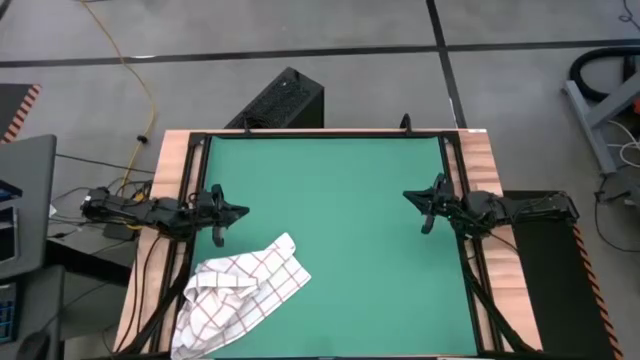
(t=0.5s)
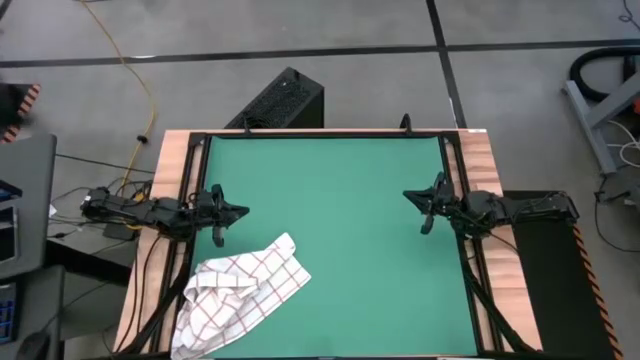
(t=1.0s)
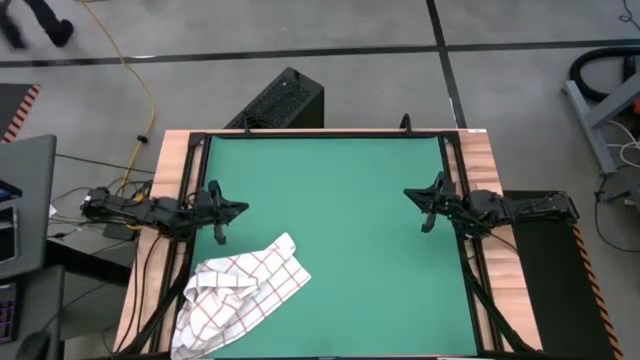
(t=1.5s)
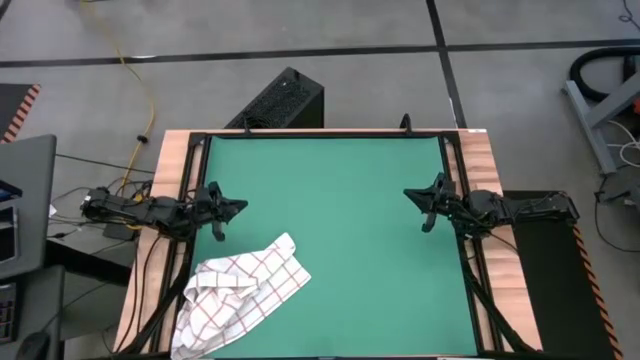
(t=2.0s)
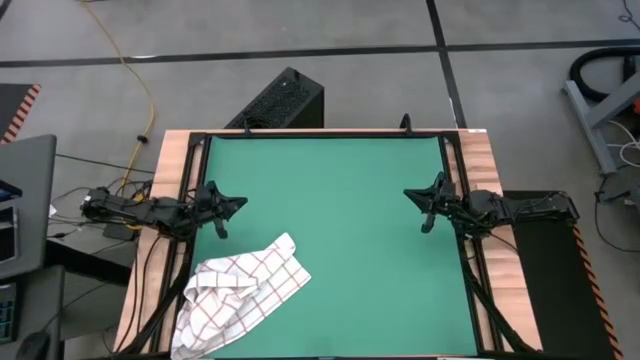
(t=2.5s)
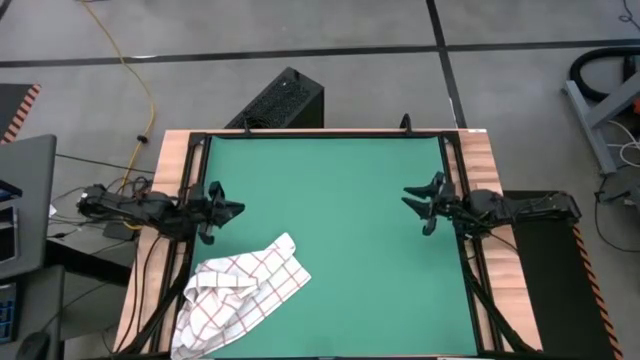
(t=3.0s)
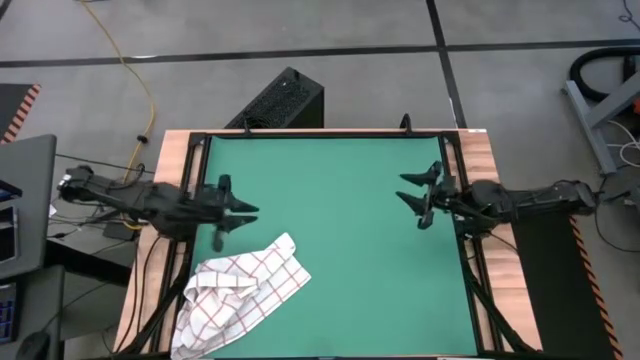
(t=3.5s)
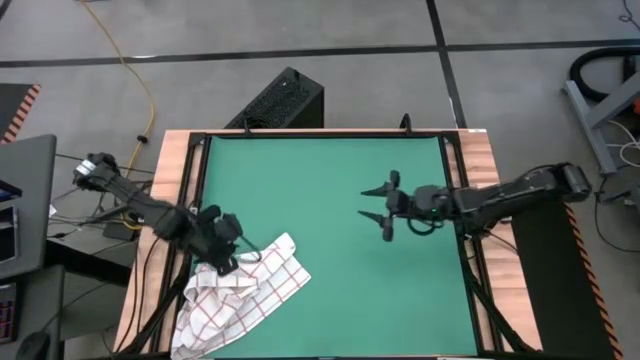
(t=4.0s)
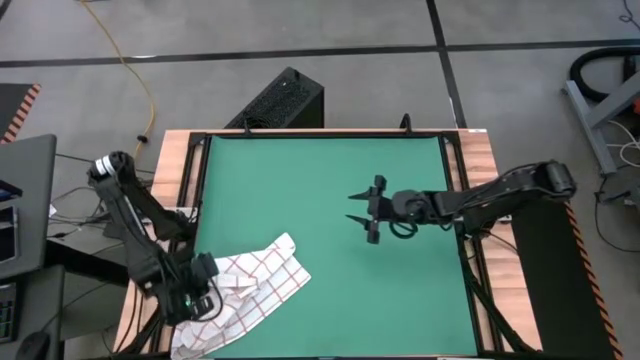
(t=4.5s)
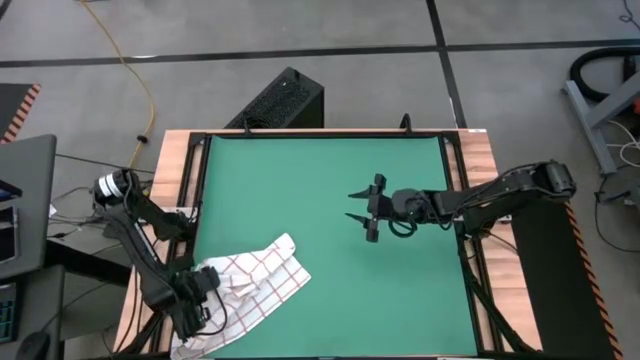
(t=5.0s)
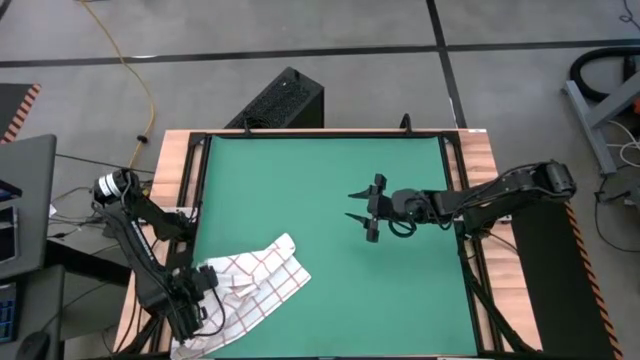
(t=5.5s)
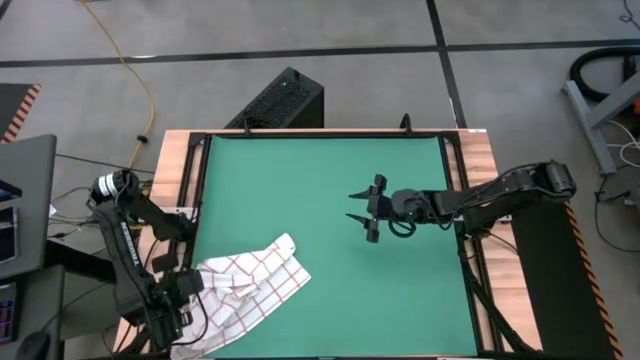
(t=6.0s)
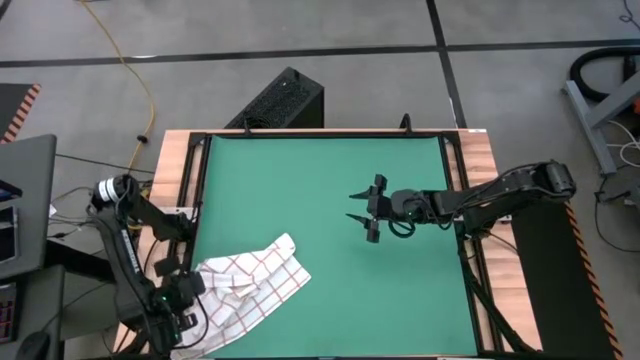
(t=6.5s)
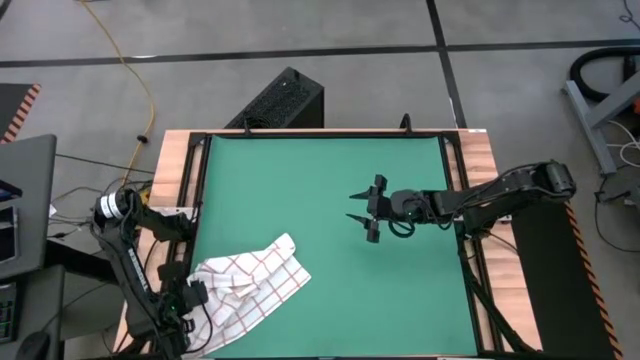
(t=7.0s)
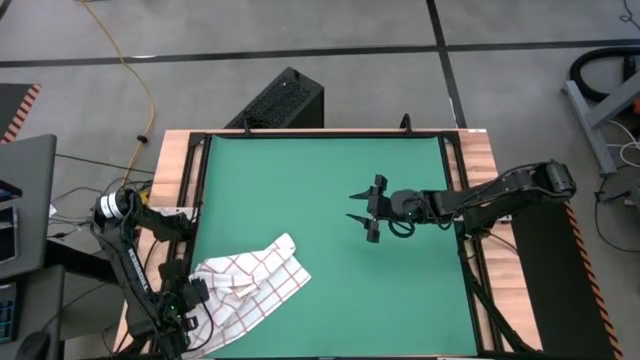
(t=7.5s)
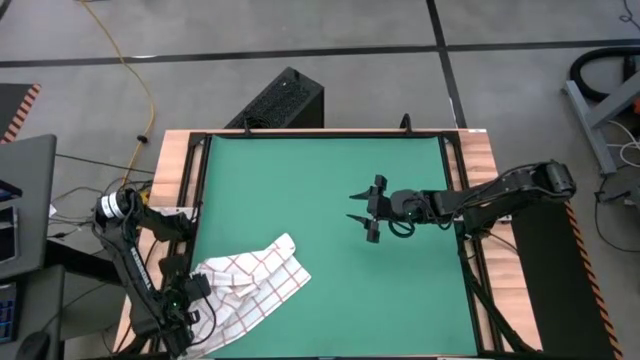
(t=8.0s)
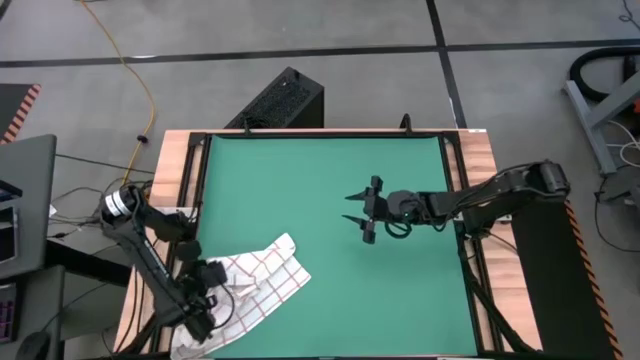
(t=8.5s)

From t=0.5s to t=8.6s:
Task: Roll towel
Roll the white towel
